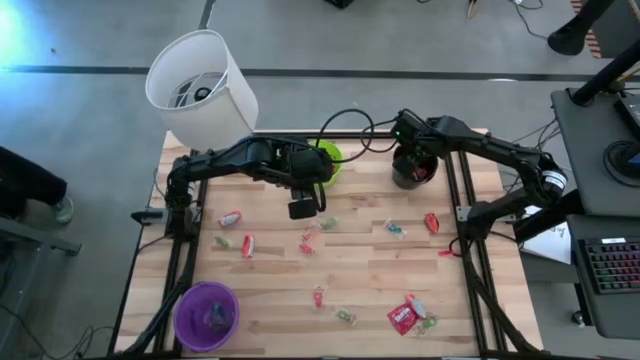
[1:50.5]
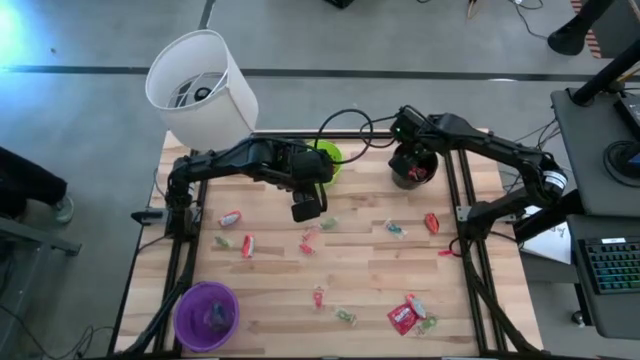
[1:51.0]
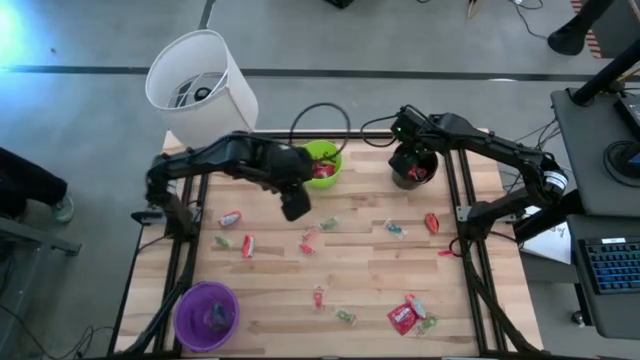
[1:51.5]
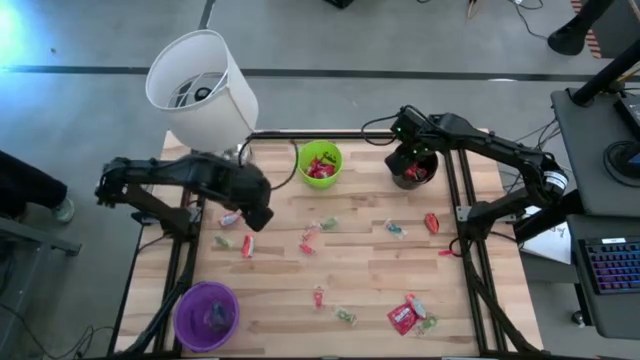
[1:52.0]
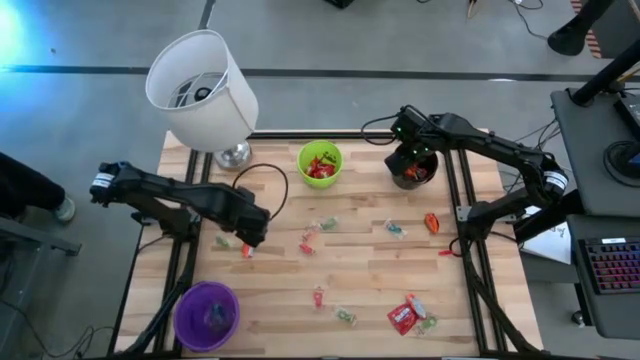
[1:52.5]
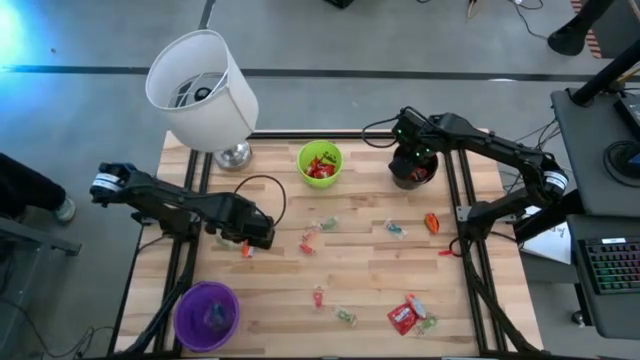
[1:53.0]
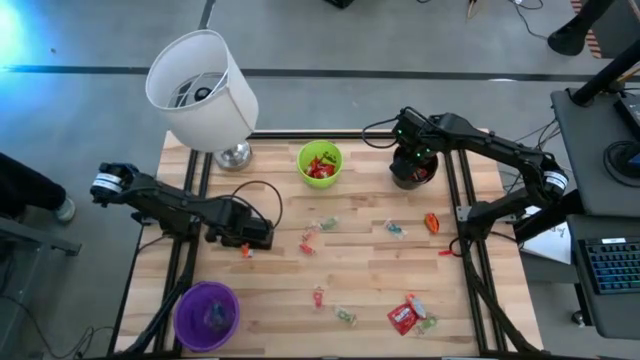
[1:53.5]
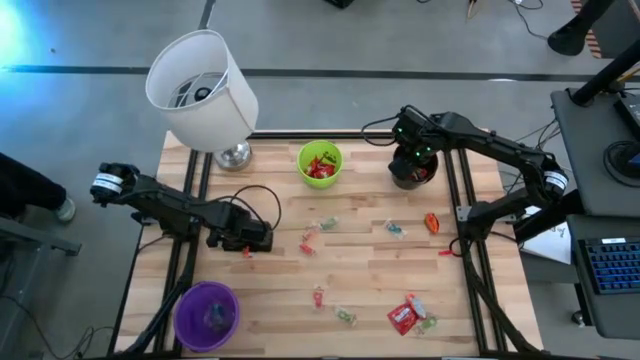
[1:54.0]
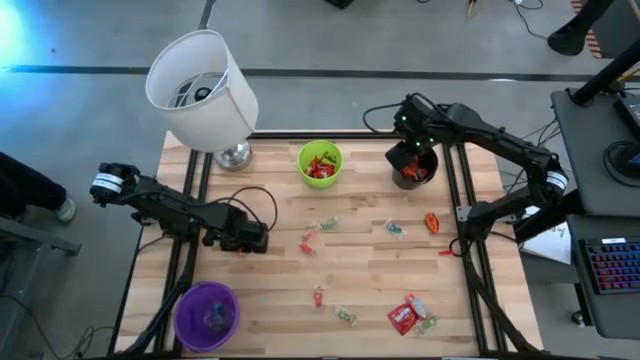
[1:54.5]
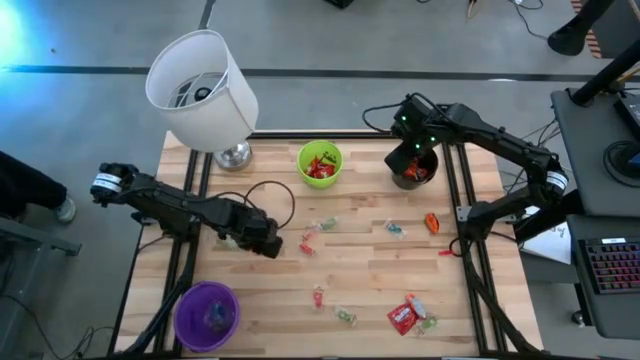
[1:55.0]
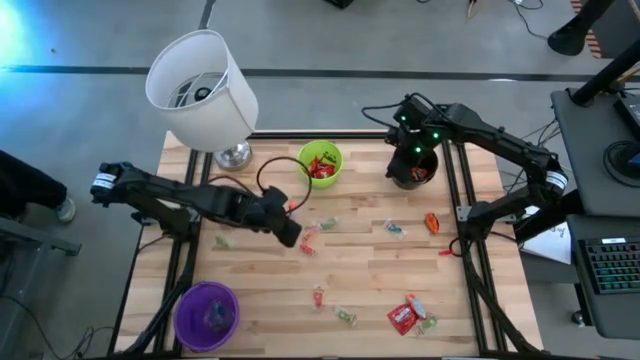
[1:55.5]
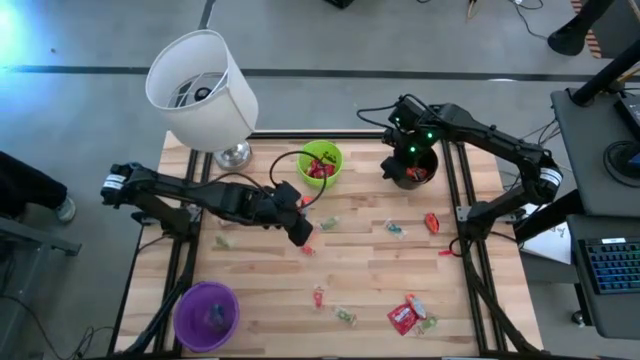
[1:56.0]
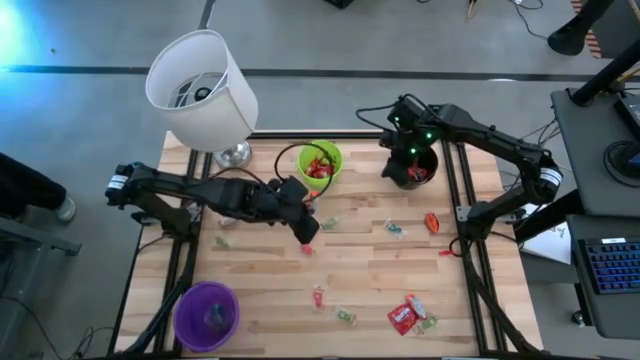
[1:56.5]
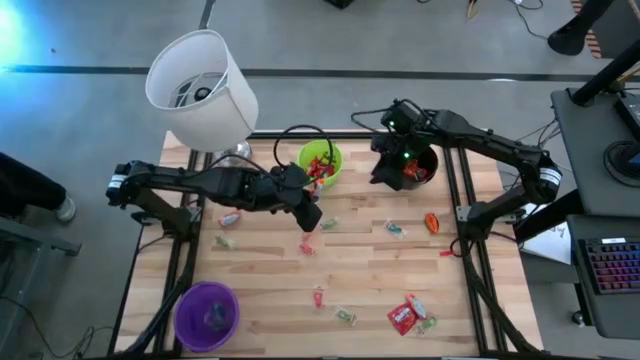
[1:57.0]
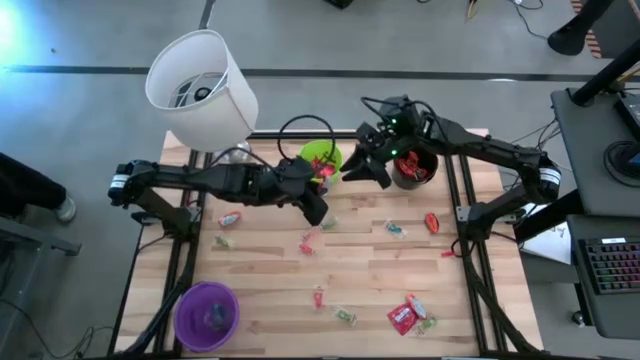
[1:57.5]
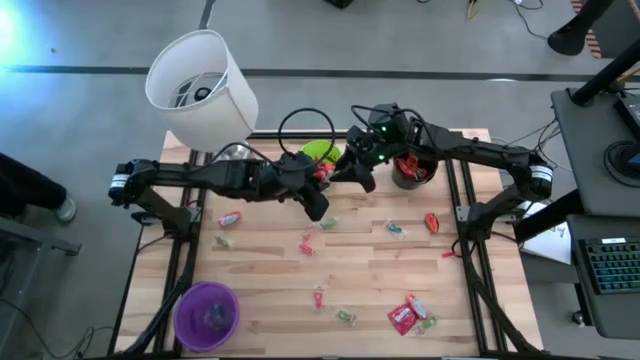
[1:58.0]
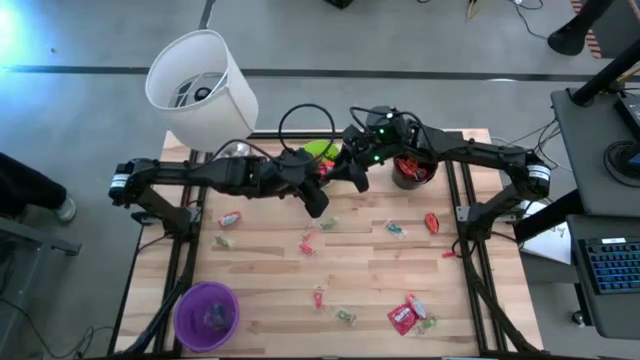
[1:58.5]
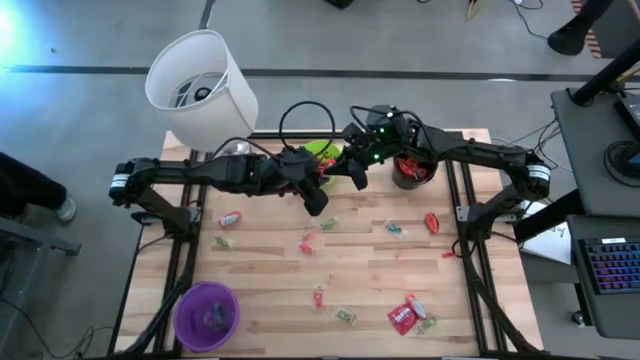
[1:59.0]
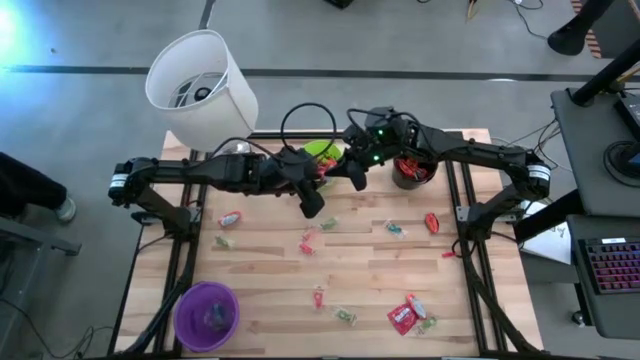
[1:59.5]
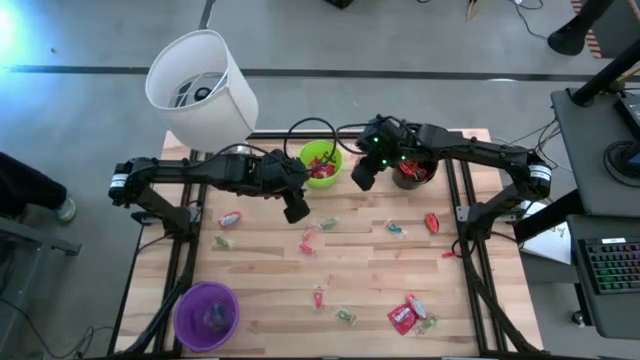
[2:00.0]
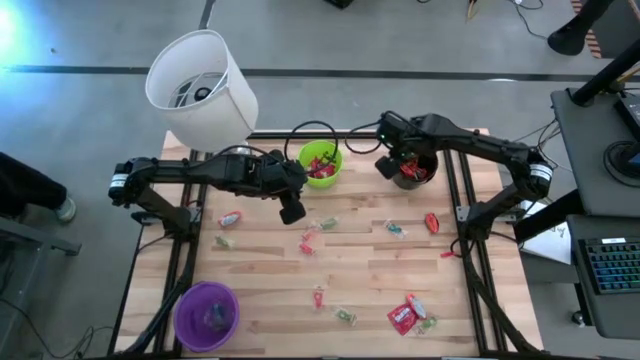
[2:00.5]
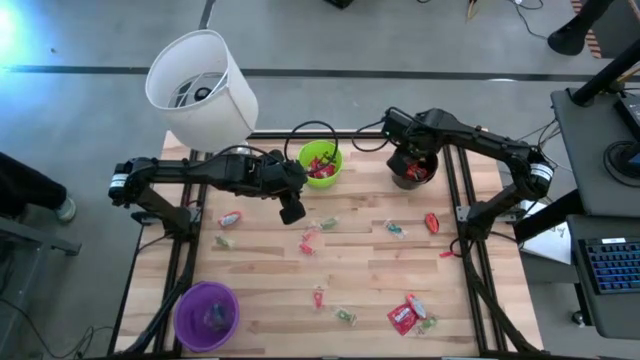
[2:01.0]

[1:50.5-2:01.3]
Task: Sort candy
Put the orange candy into the black bucket

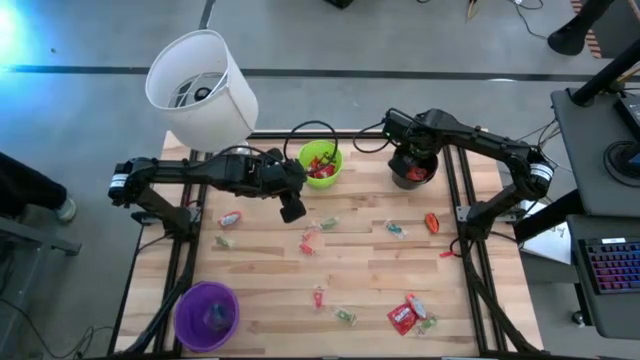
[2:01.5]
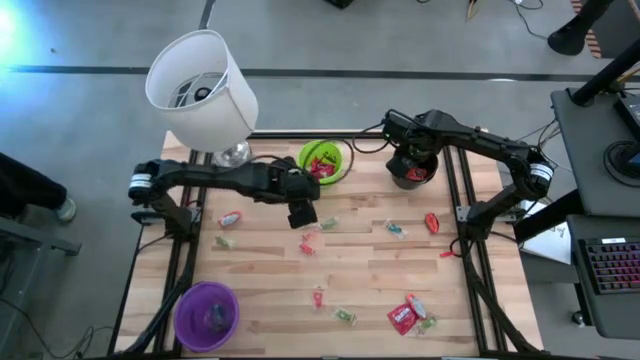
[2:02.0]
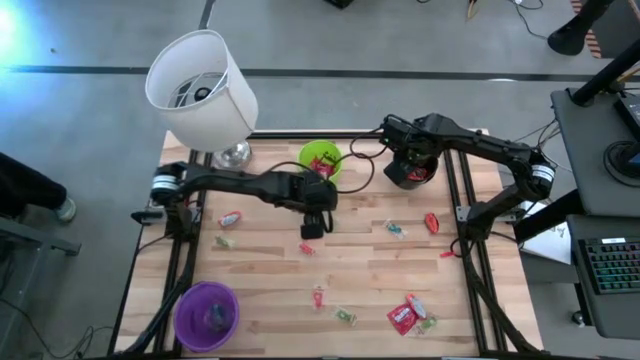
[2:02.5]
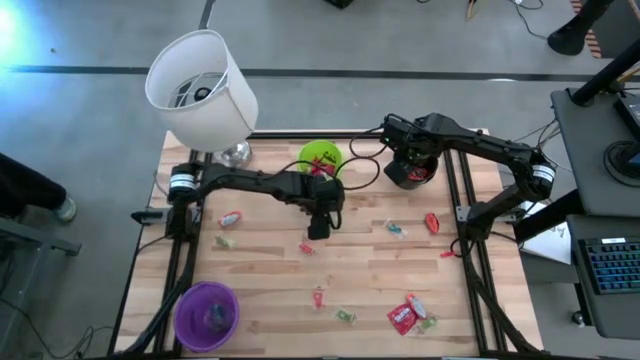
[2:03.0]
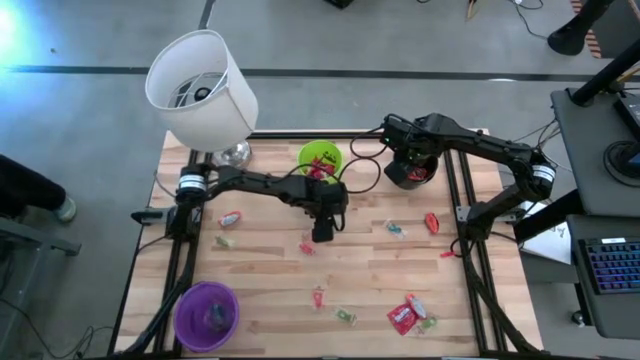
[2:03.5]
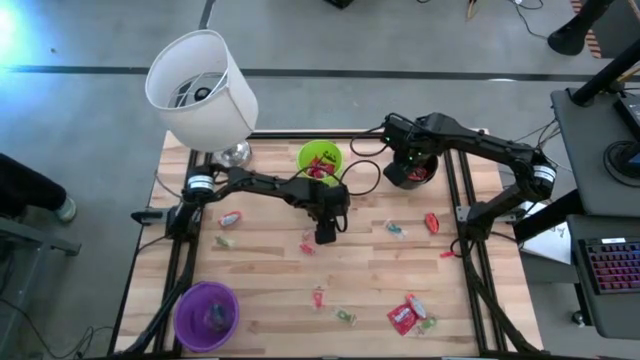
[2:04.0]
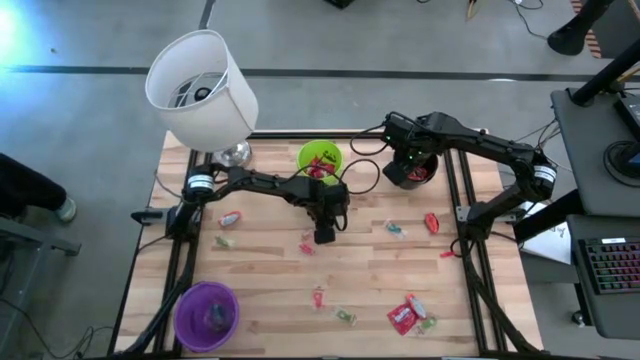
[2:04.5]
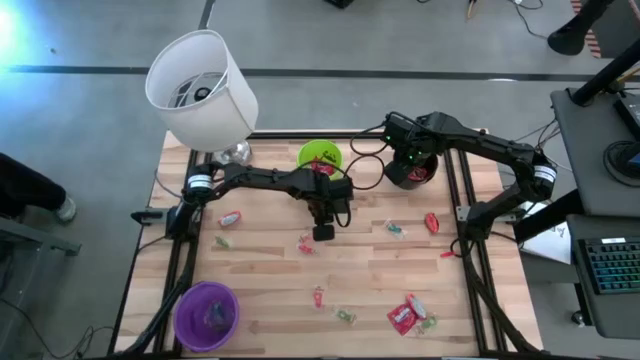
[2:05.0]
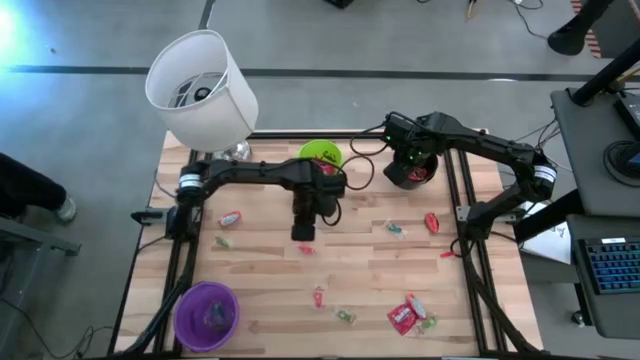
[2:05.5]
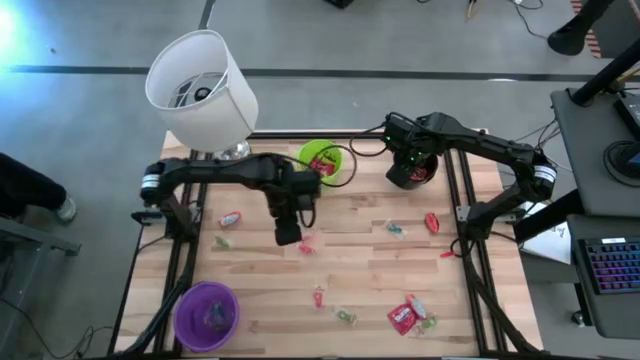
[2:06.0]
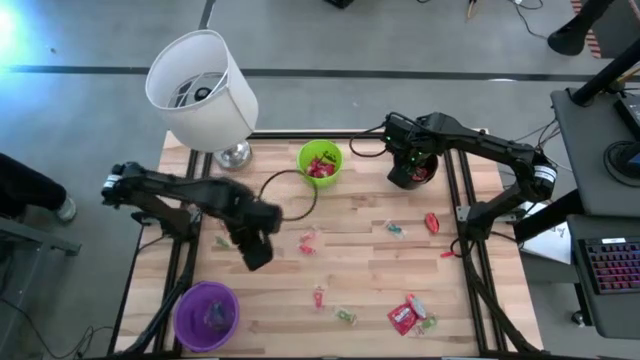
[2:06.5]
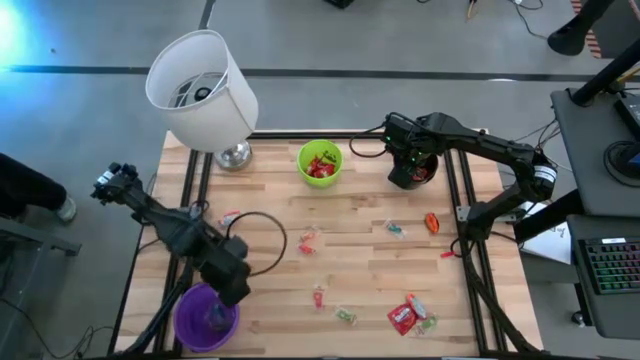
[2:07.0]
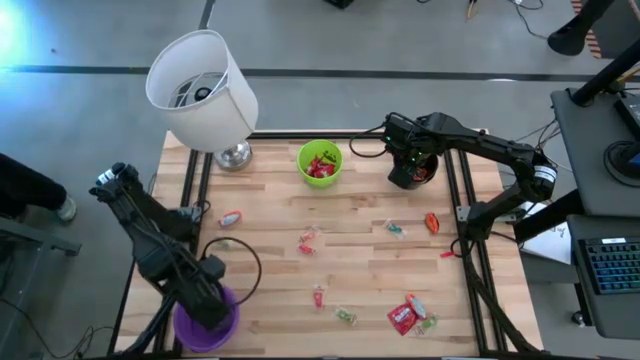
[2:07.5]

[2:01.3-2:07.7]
Put the green gummy candy into the violet bucket

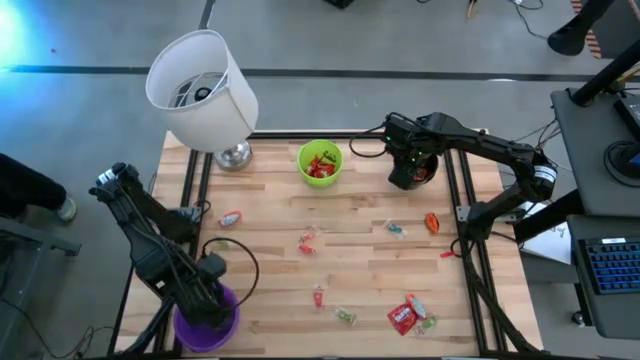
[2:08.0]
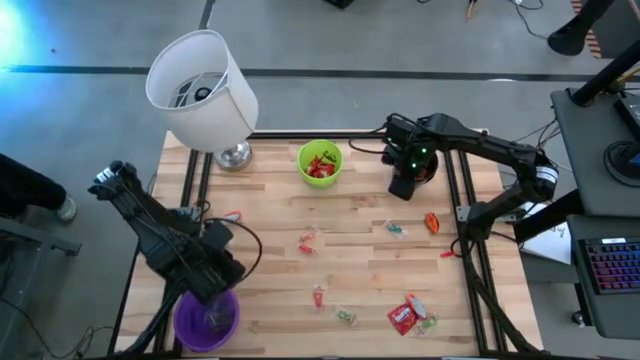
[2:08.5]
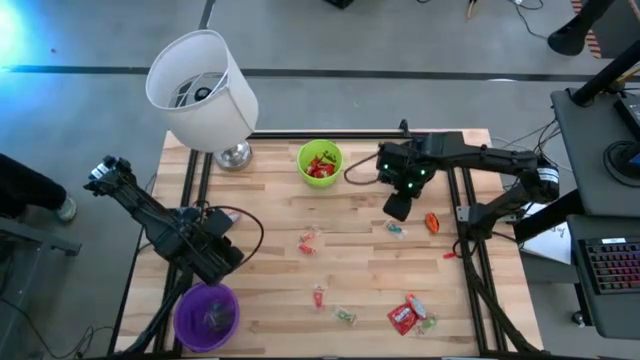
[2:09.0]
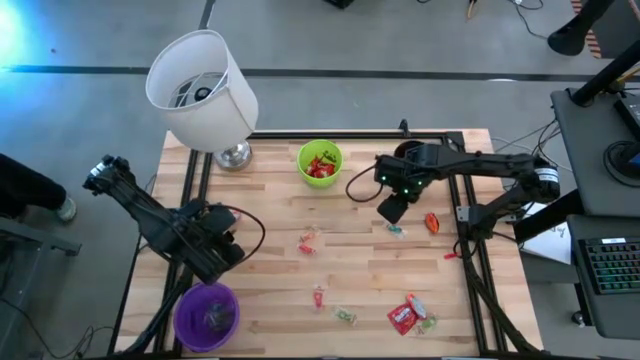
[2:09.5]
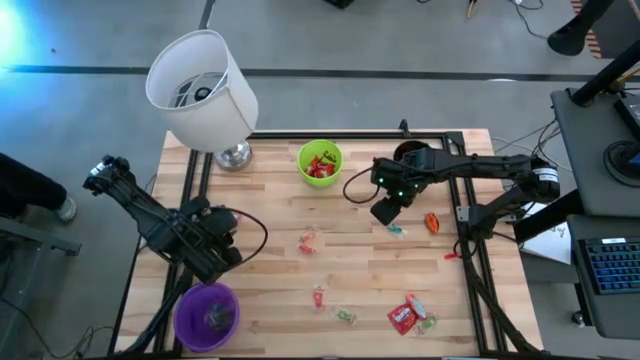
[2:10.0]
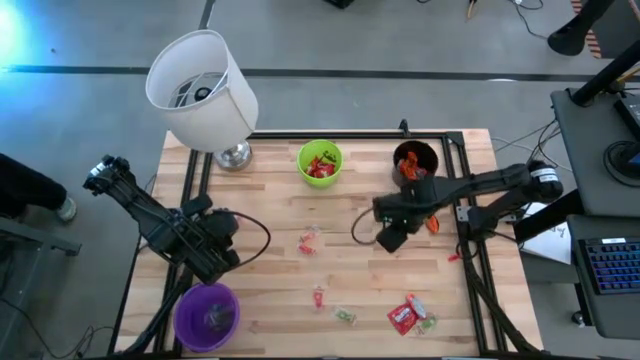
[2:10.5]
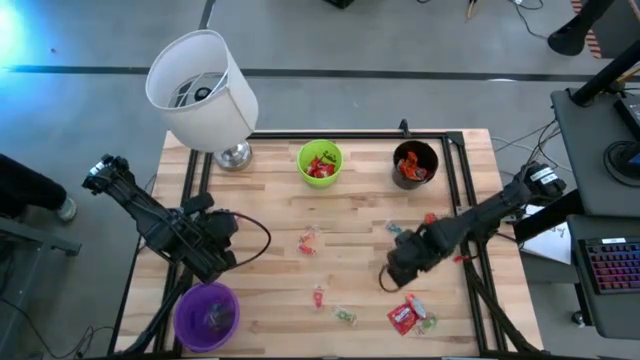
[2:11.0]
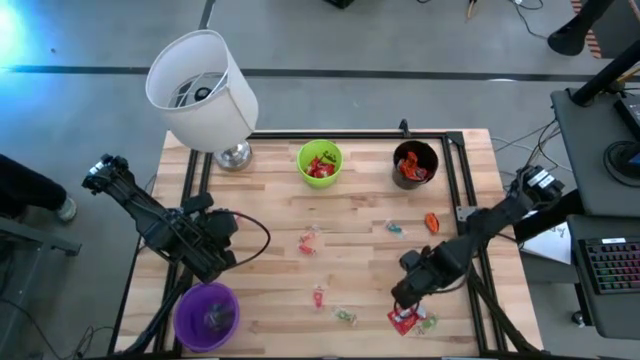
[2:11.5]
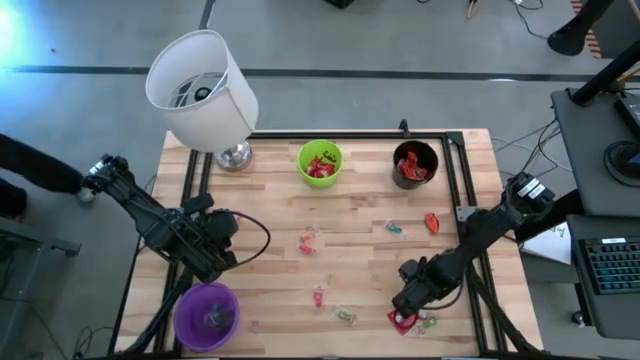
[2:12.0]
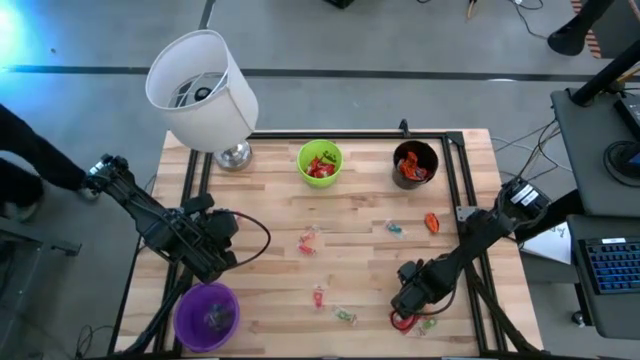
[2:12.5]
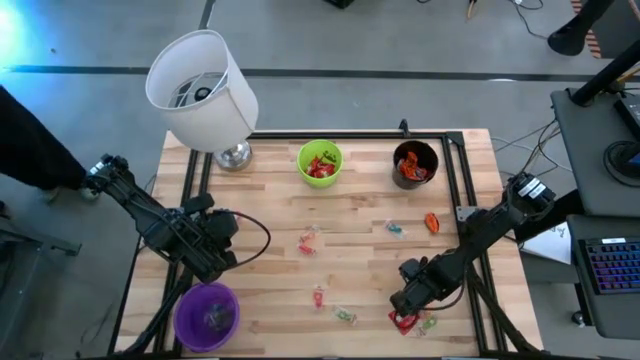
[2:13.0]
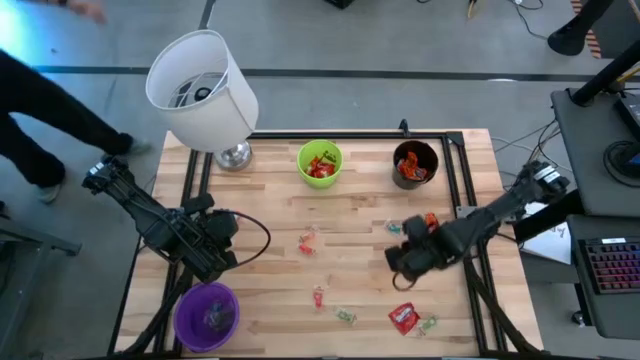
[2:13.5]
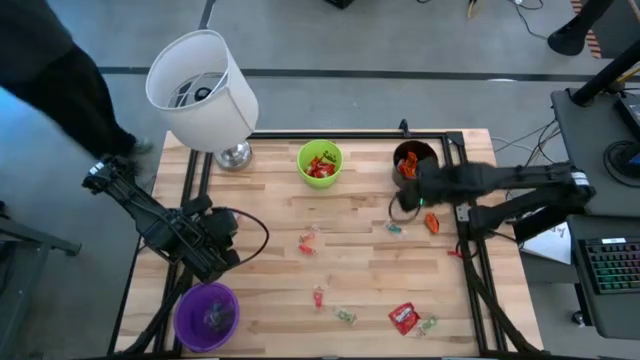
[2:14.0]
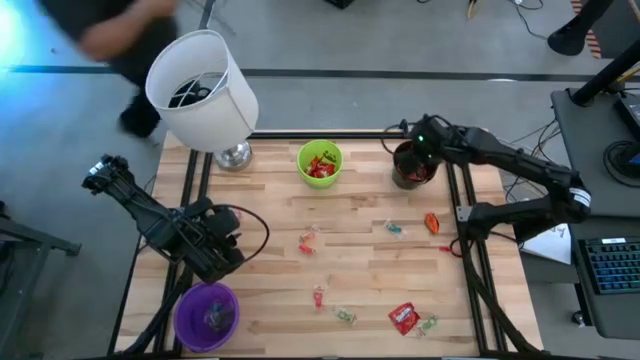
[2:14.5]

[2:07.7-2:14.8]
Put the orange candy into the black bucket
